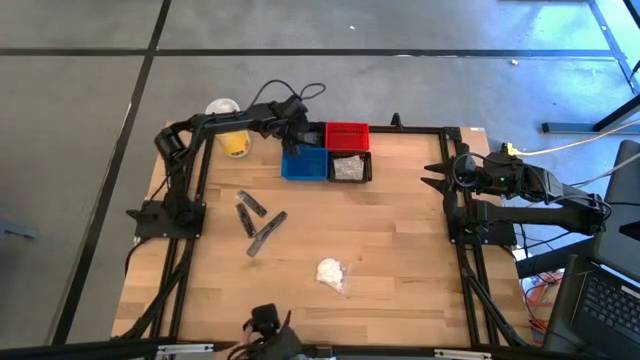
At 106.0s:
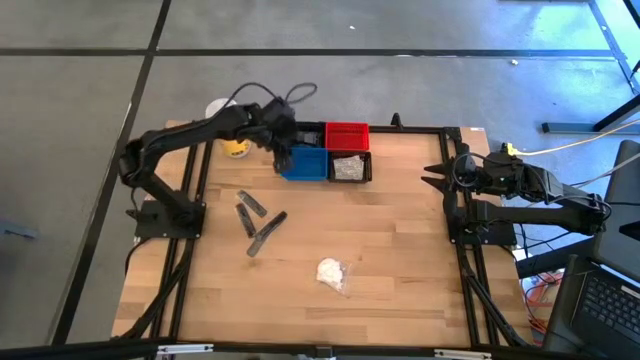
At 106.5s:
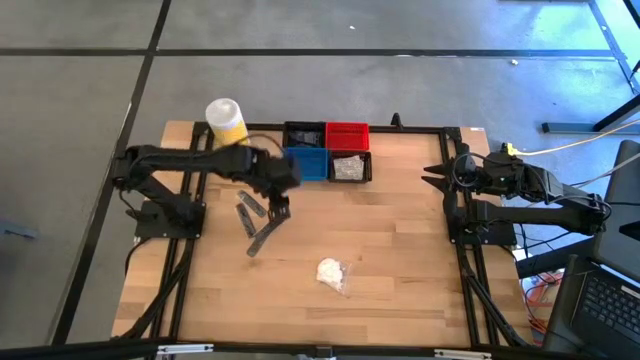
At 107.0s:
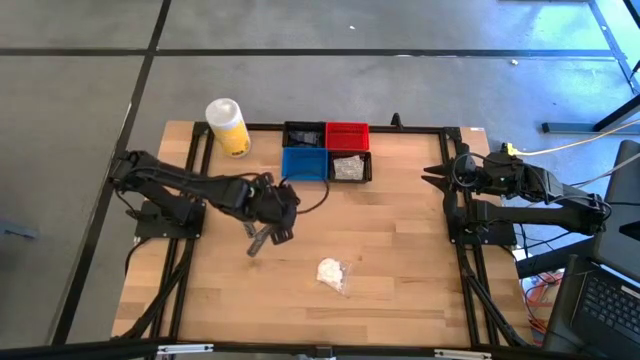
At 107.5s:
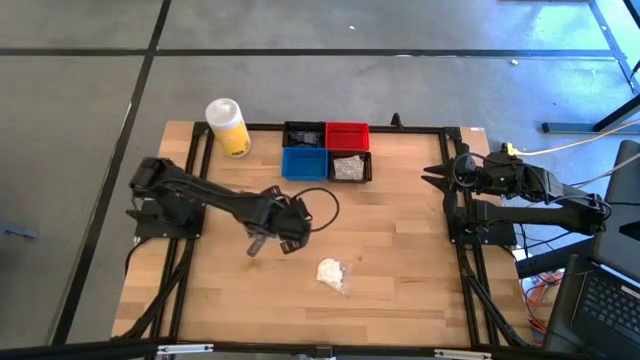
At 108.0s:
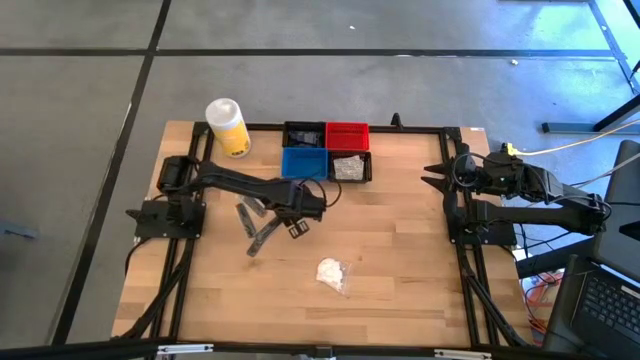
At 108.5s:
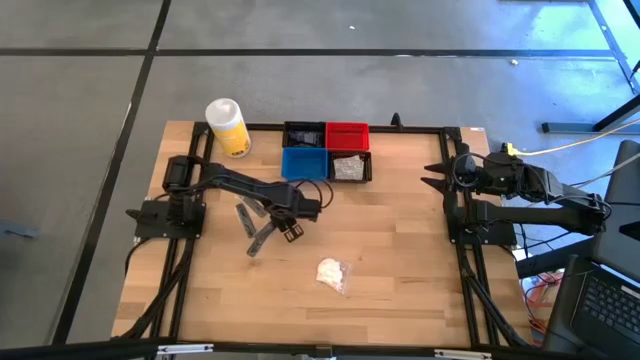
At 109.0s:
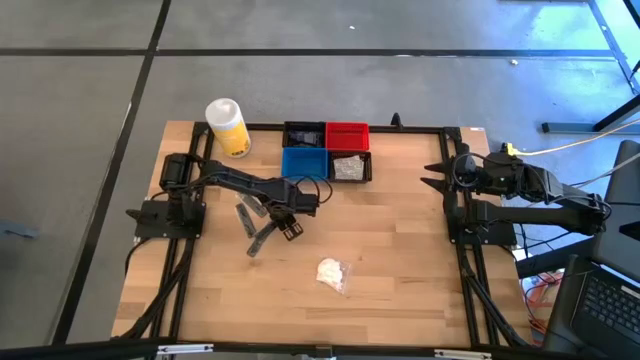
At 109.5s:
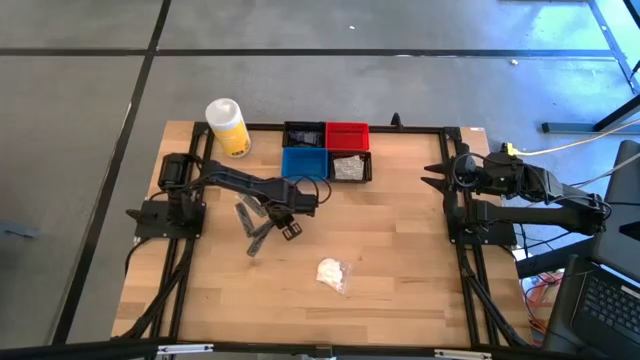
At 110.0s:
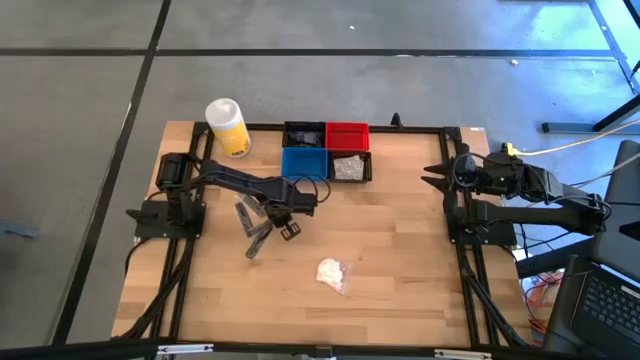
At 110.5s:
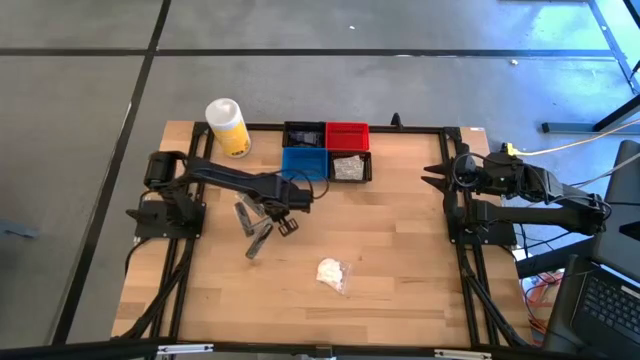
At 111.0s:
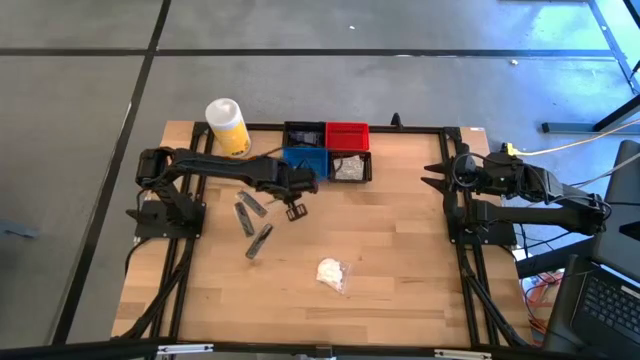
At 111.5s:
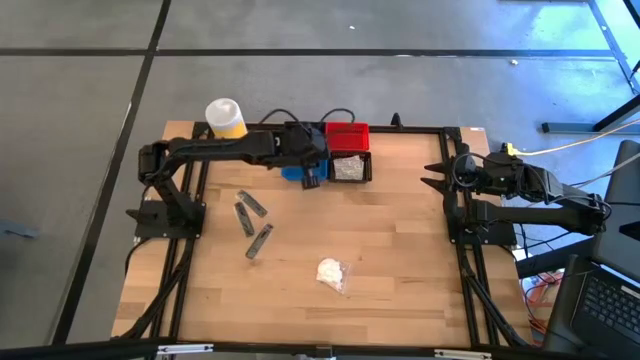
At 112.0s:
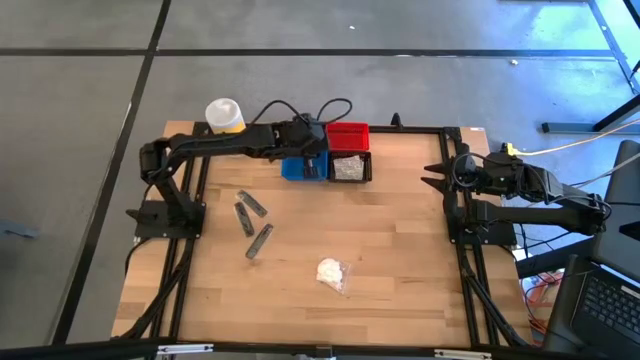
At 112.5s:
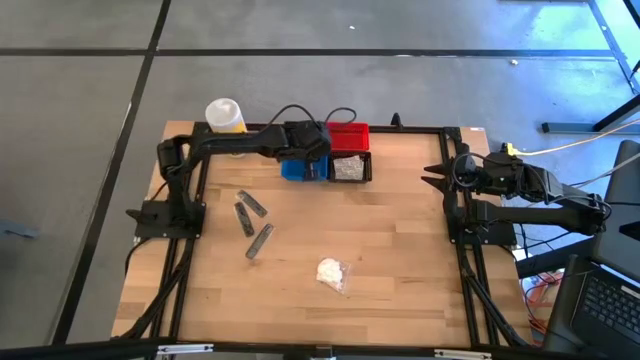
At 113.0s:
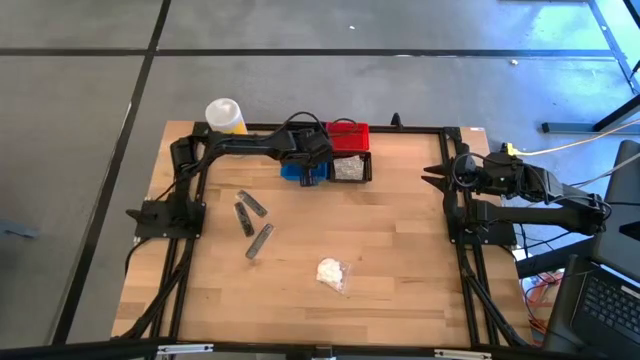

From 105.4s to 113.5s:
Task: Pick & Place Travel size toiletries
Put the comb into the blue bin

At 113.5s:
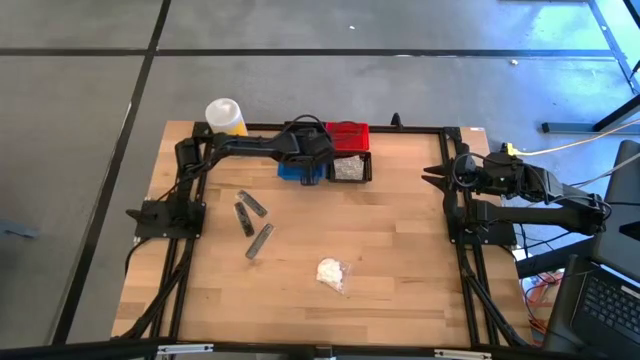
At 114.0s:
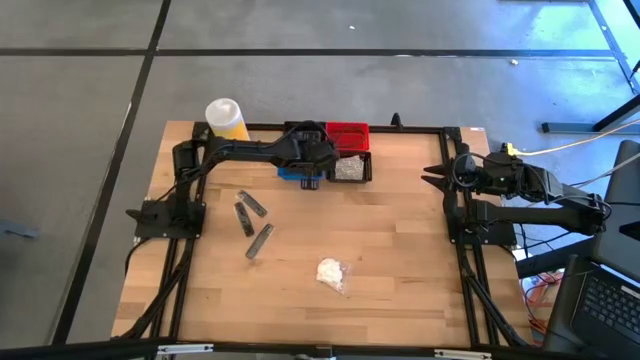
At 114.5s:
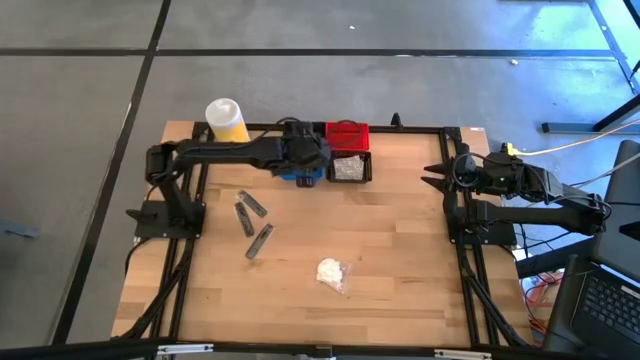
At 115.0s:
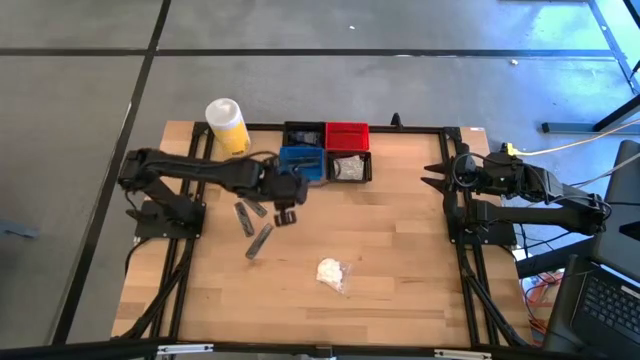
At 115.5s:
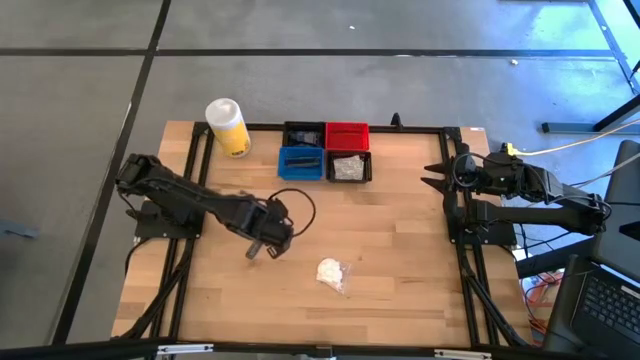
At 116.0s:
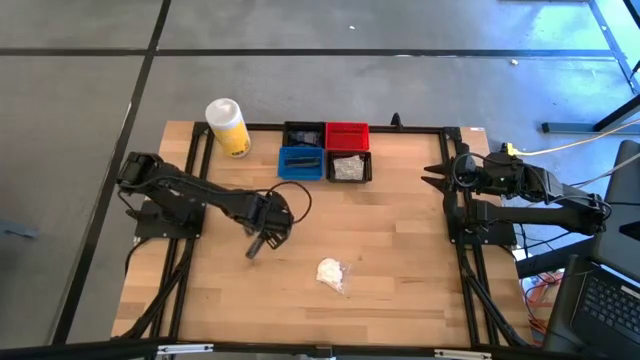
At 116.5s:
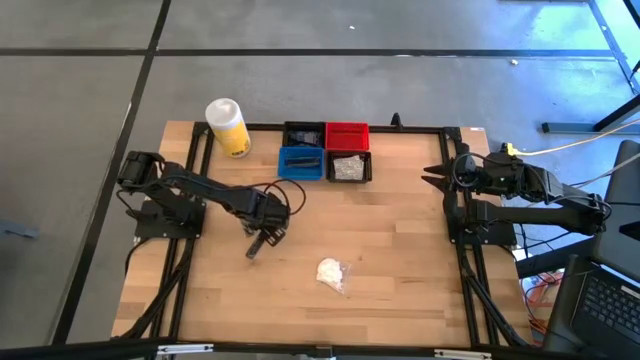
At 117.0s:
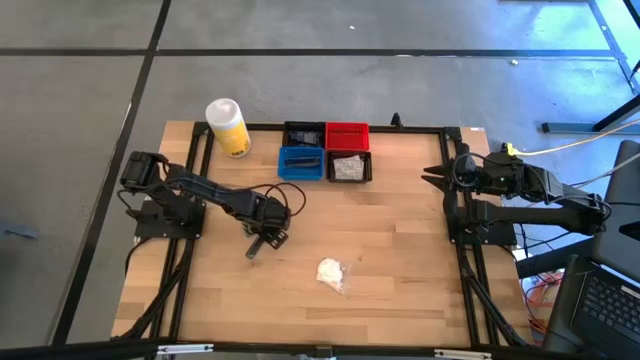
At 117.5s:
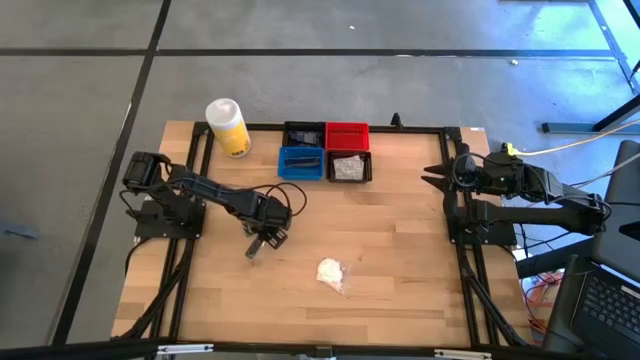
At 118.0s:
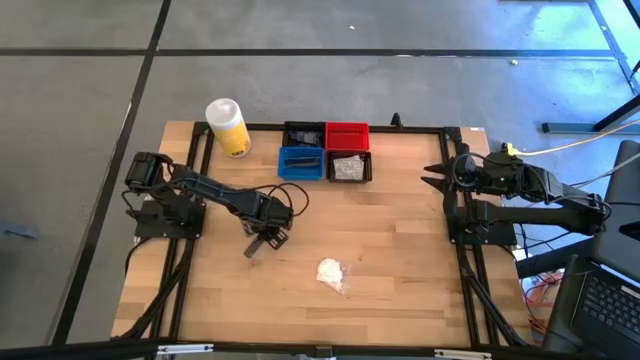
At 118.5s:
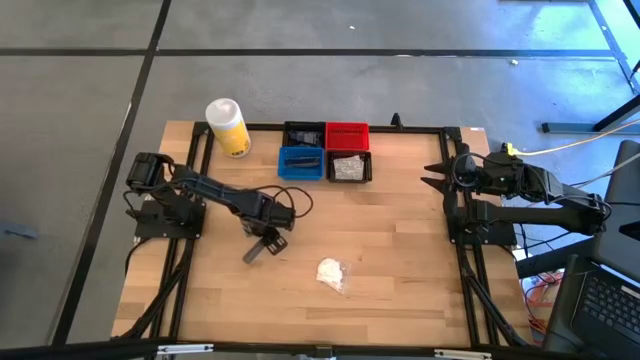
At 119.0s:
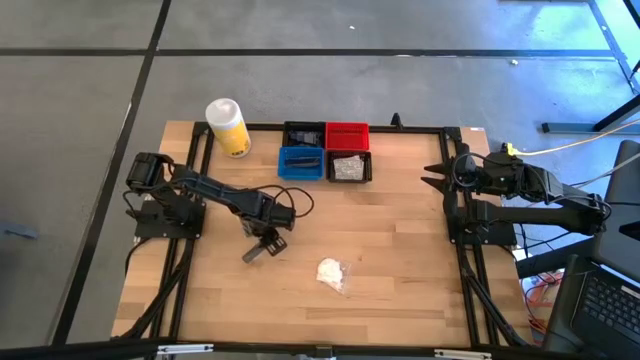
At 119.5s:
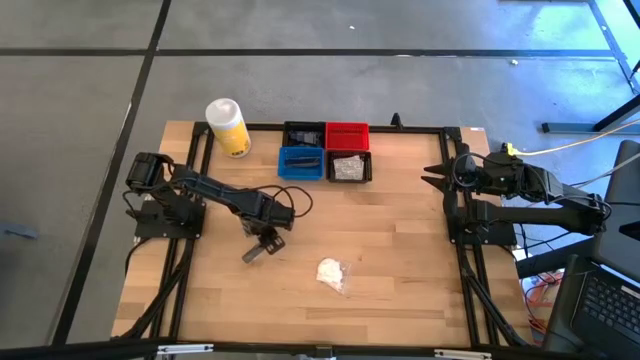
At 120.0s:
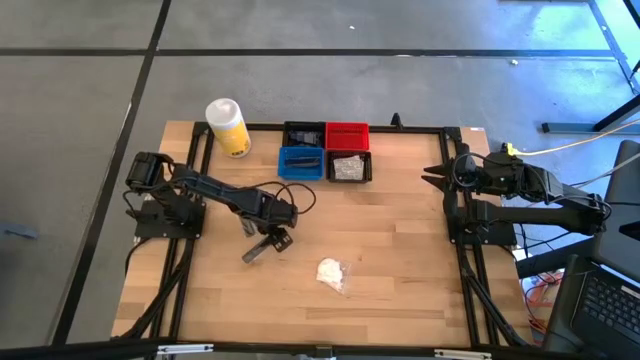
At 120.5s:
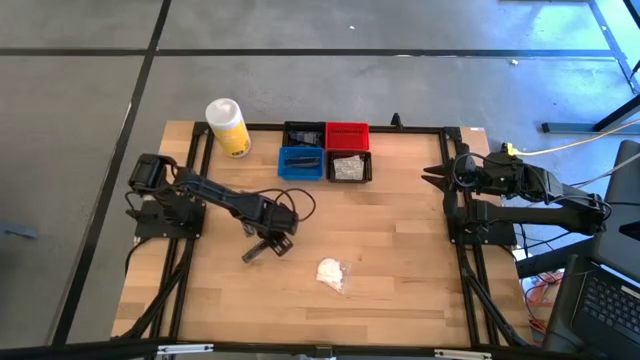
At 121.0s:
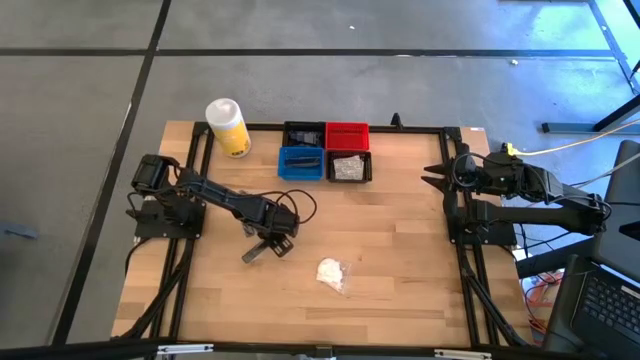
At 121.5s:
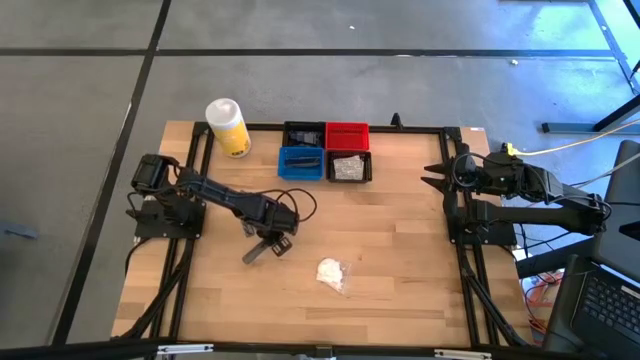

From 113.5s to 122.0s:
Put the bottom comb into the blue bin

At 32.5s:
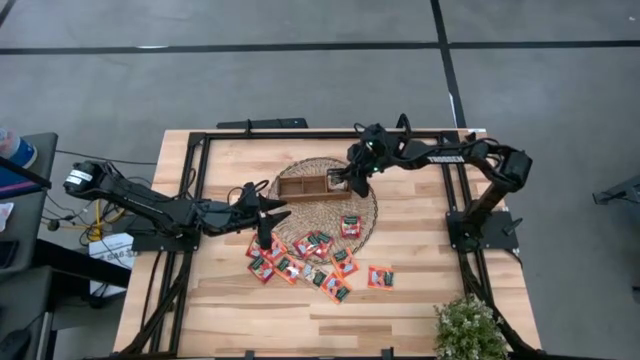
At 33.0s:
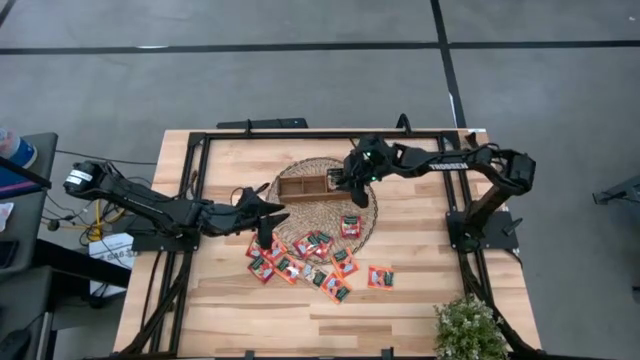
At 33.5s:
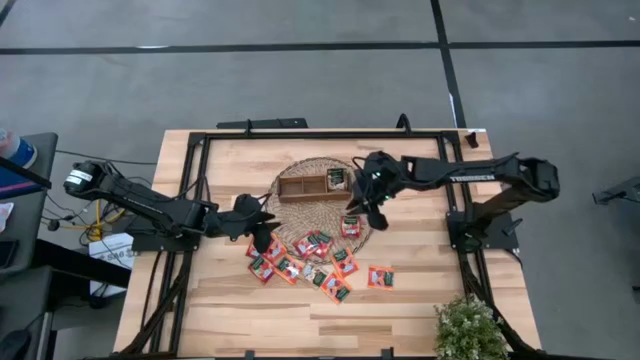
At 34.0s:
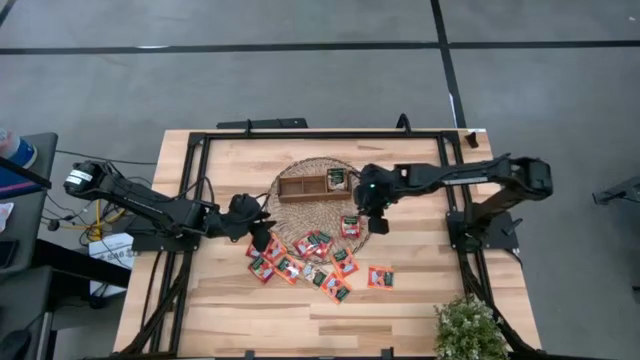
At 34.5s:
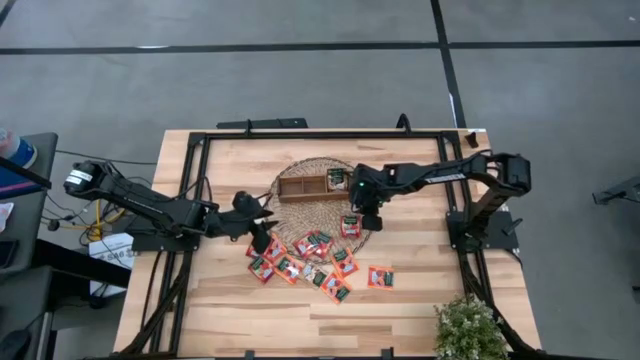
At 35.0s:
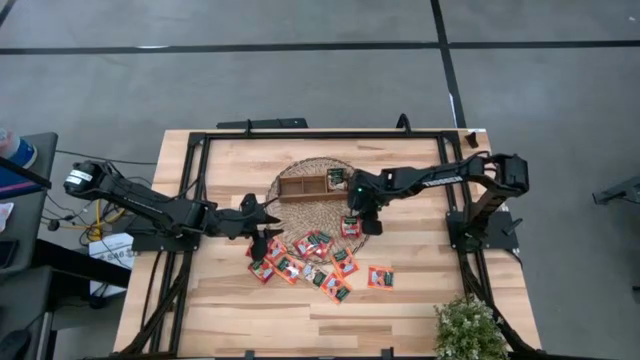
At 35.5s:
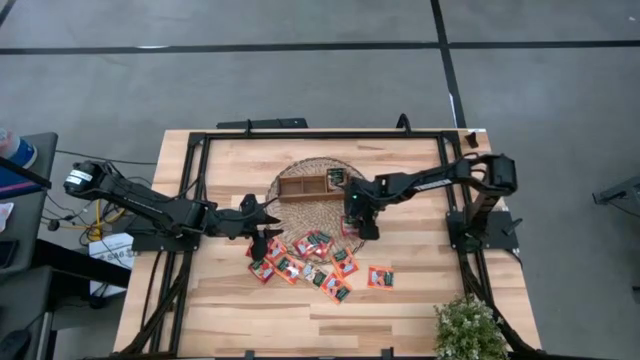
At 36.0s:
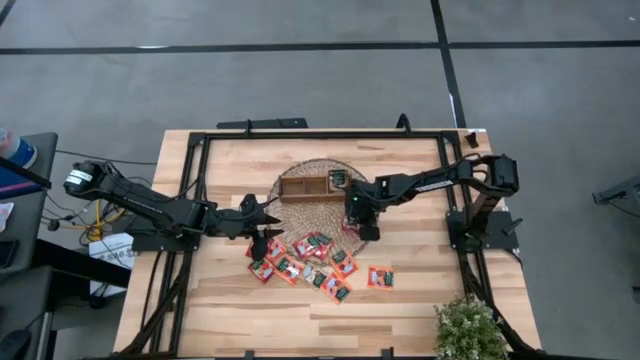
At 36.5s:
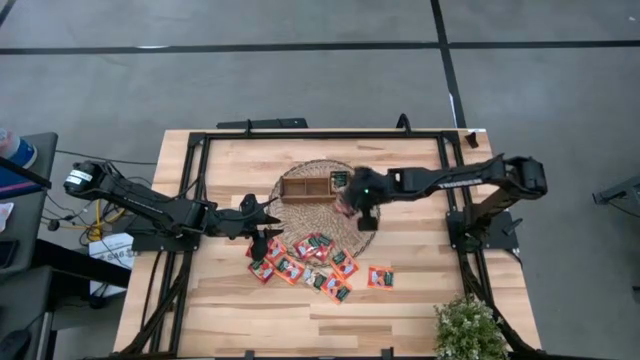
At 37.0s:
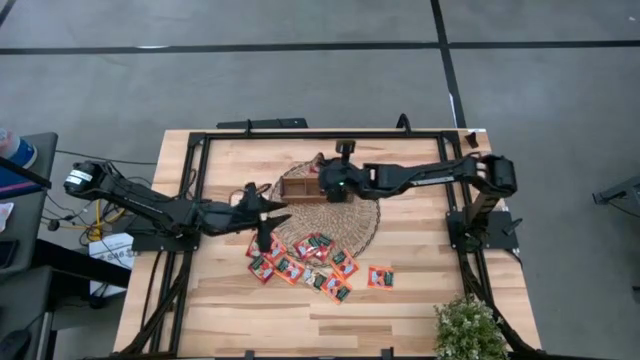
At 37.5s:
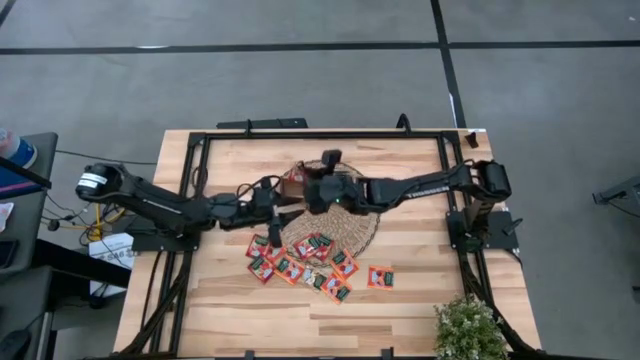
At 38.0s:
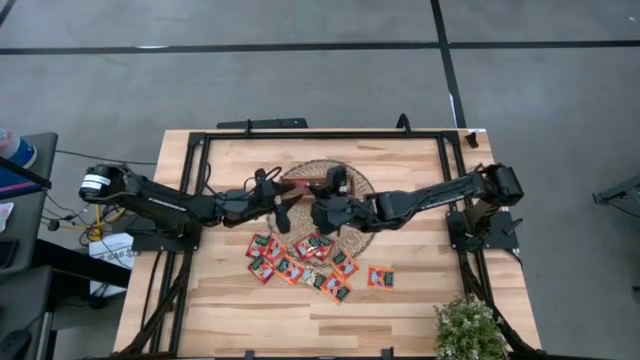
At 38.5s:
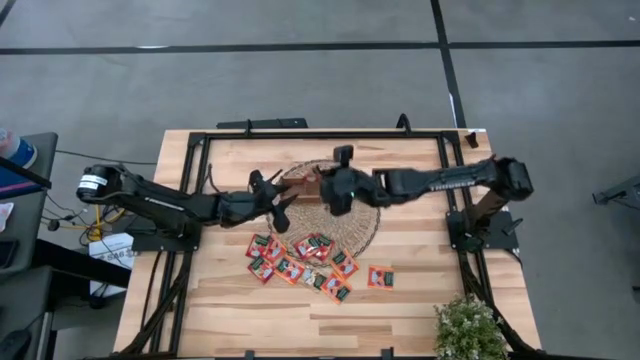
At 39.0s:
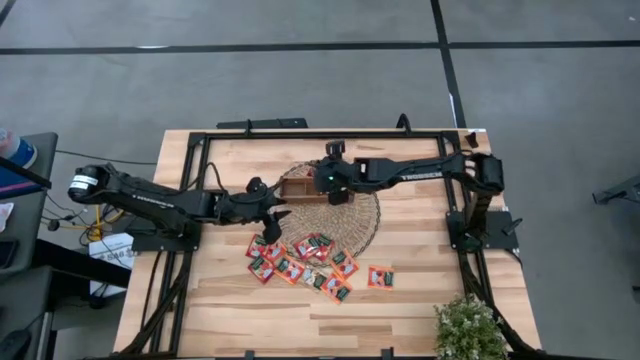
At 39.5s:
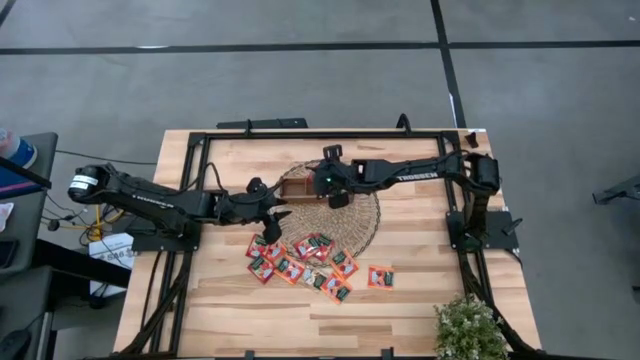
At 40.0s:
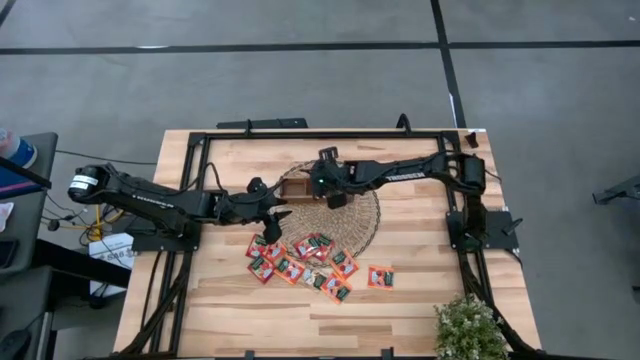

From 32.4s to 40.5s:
Task: Pick & Place Tea
Put the red tea bag into the middle section of the wooden organizer
